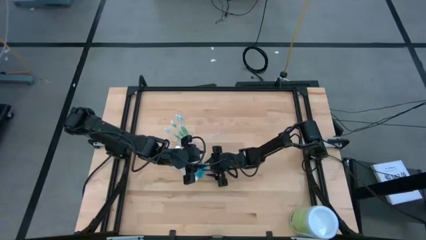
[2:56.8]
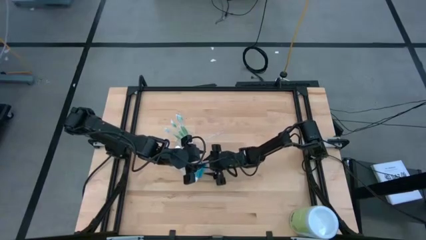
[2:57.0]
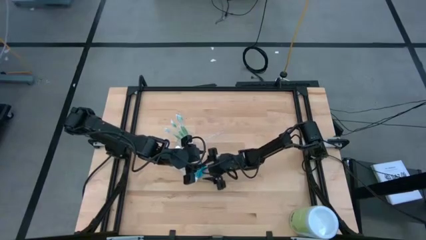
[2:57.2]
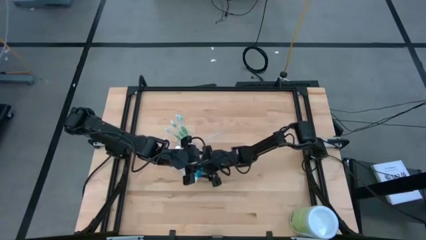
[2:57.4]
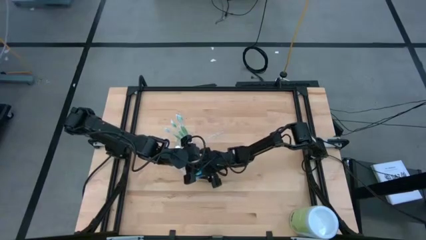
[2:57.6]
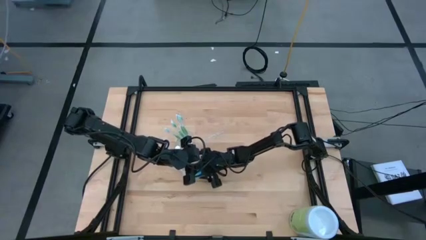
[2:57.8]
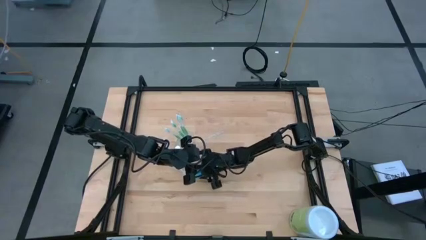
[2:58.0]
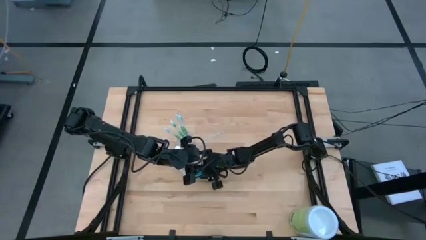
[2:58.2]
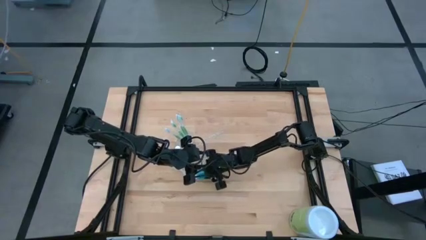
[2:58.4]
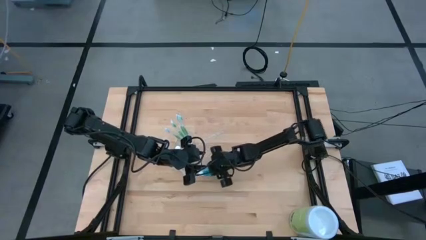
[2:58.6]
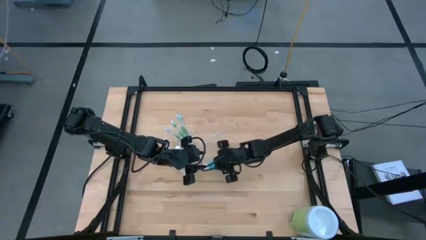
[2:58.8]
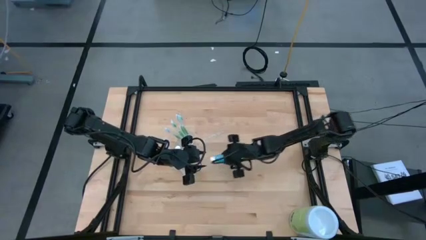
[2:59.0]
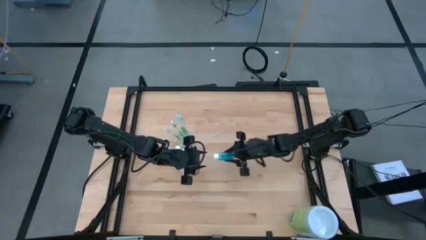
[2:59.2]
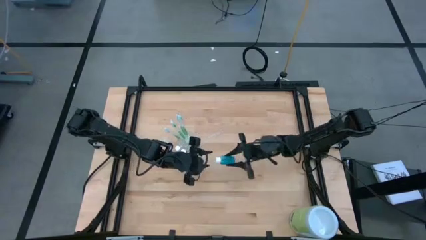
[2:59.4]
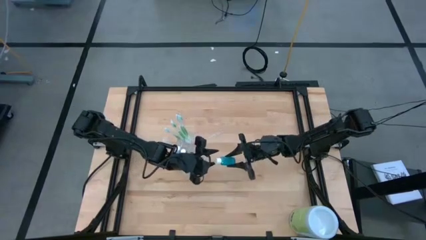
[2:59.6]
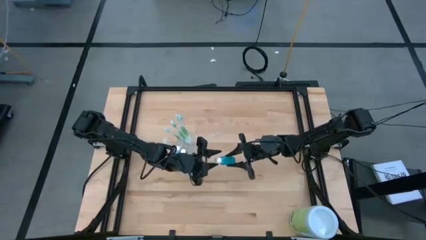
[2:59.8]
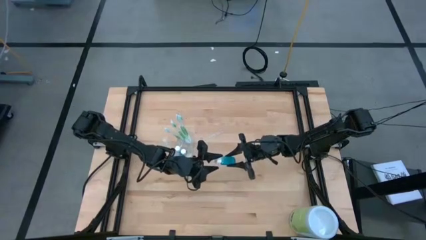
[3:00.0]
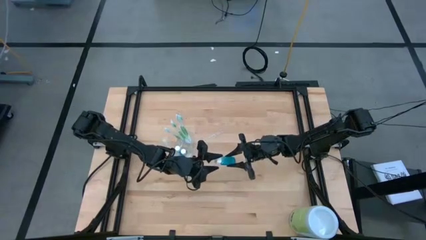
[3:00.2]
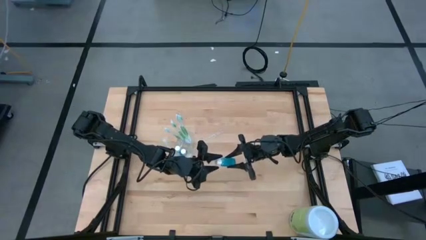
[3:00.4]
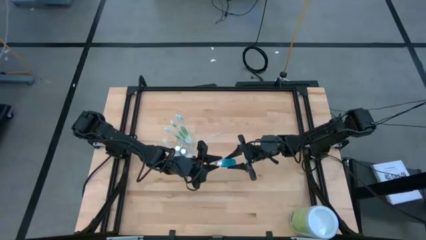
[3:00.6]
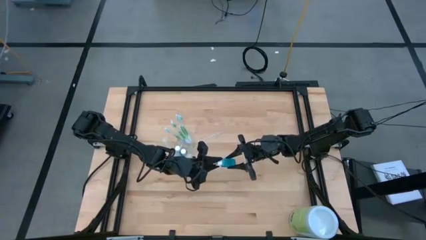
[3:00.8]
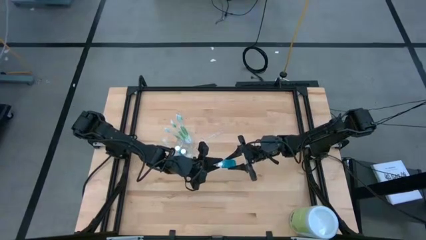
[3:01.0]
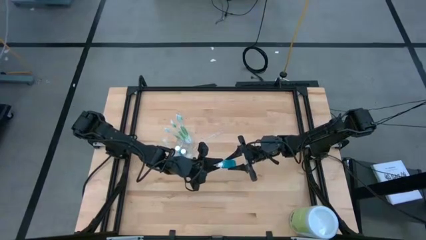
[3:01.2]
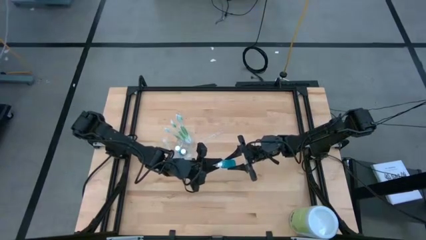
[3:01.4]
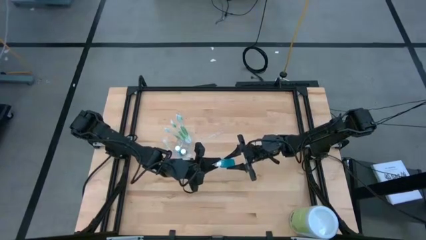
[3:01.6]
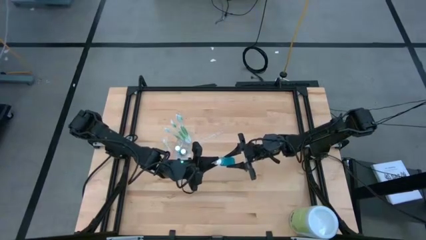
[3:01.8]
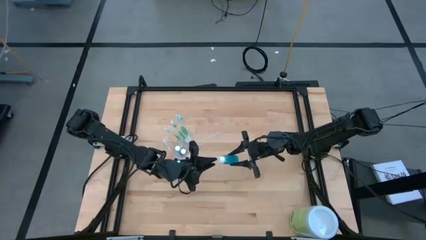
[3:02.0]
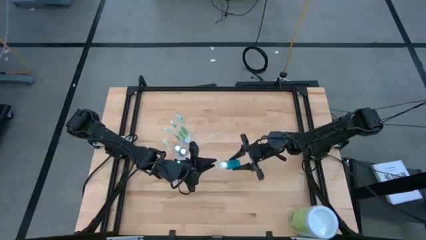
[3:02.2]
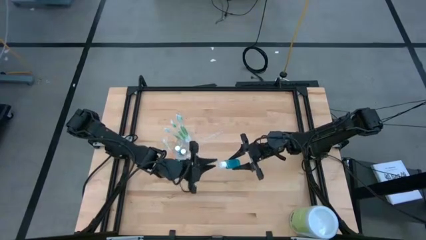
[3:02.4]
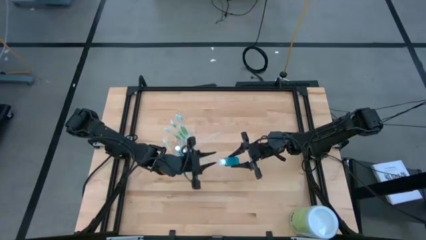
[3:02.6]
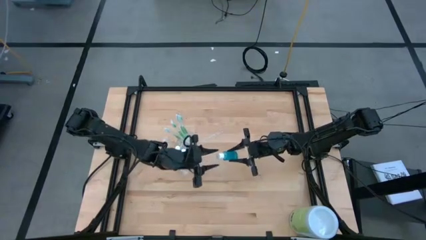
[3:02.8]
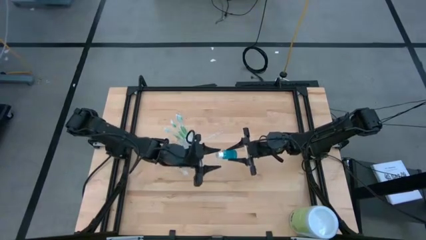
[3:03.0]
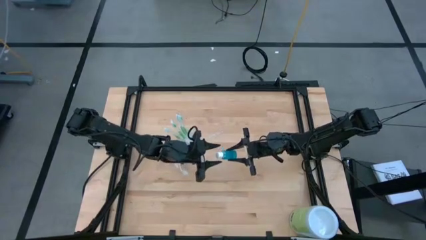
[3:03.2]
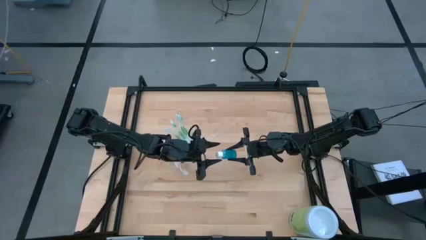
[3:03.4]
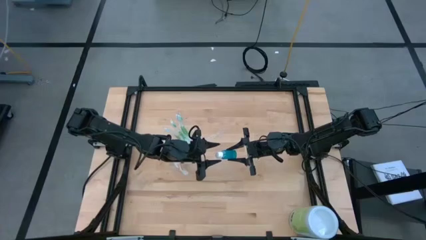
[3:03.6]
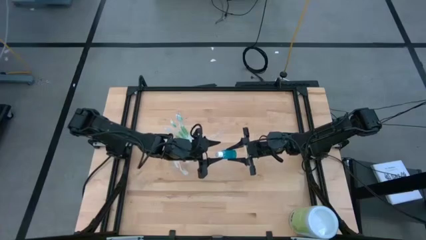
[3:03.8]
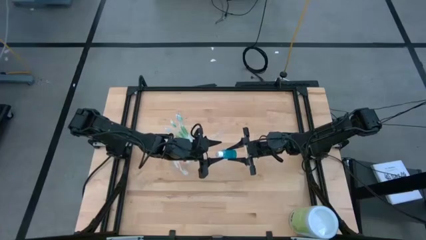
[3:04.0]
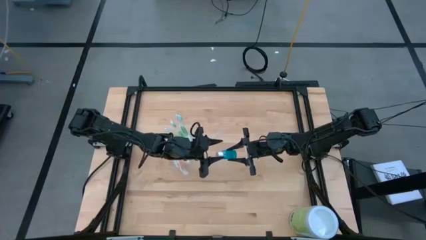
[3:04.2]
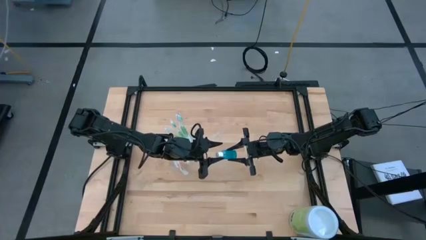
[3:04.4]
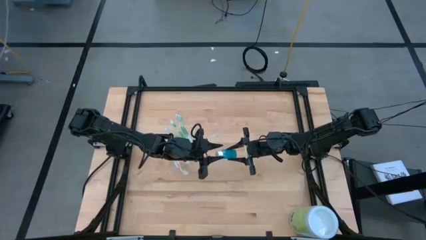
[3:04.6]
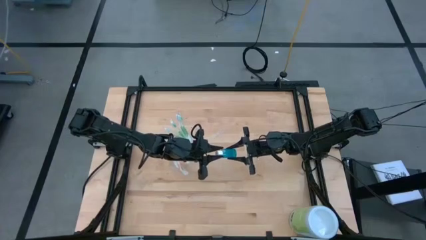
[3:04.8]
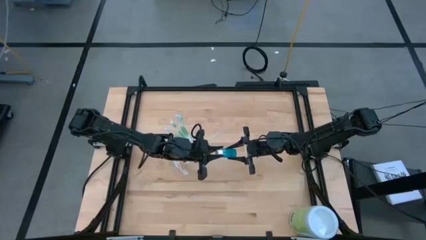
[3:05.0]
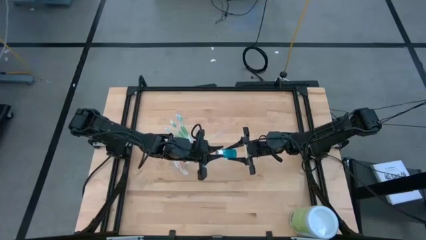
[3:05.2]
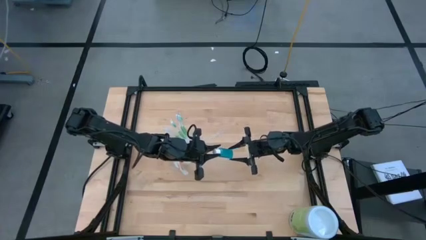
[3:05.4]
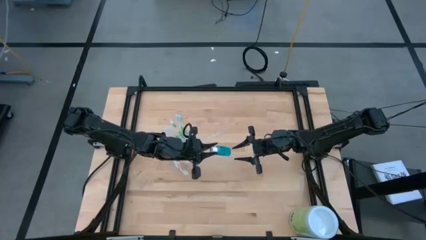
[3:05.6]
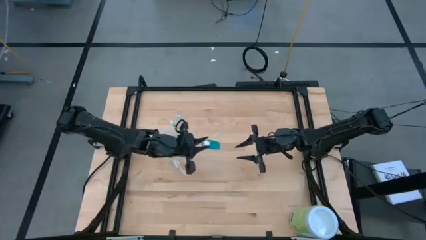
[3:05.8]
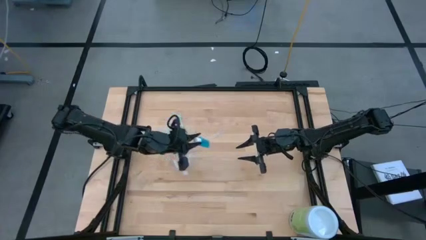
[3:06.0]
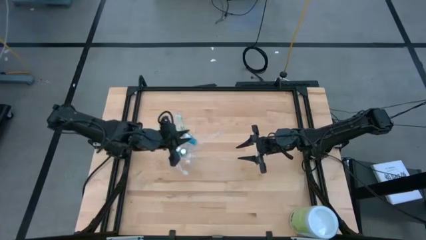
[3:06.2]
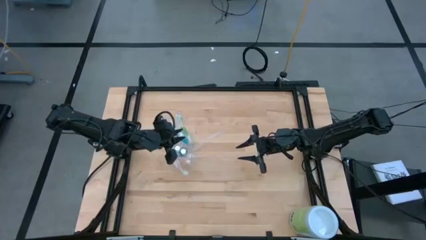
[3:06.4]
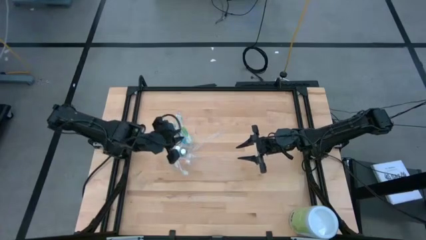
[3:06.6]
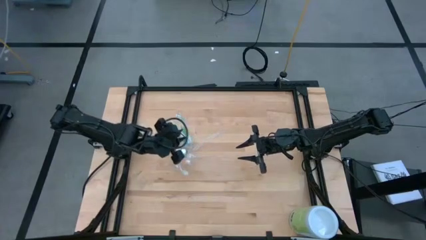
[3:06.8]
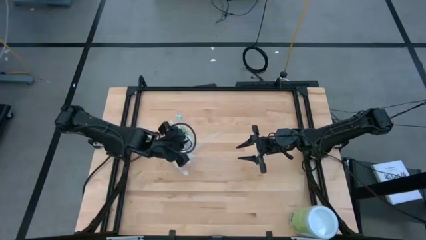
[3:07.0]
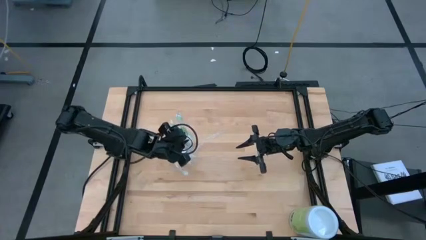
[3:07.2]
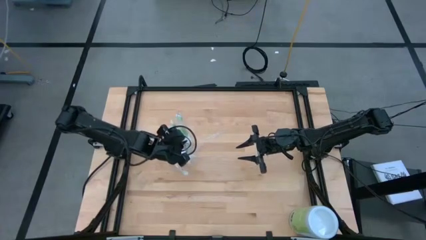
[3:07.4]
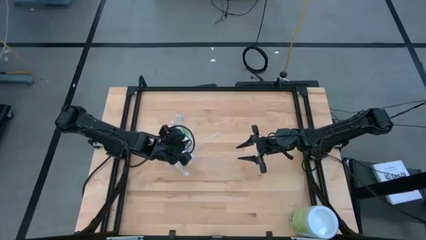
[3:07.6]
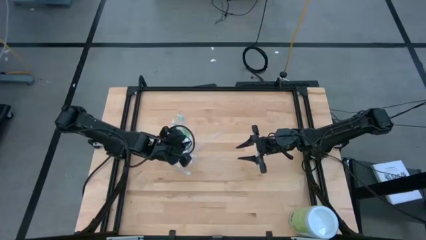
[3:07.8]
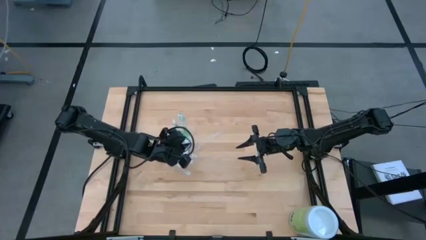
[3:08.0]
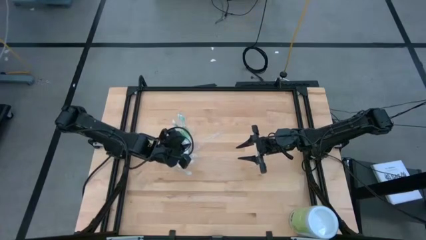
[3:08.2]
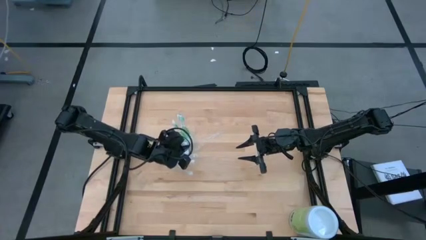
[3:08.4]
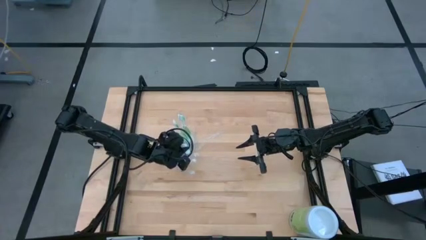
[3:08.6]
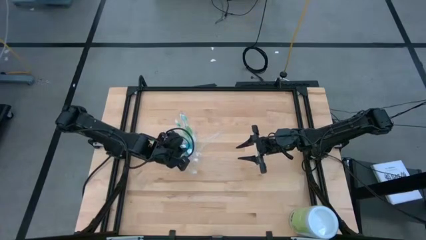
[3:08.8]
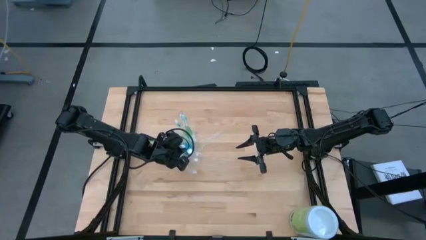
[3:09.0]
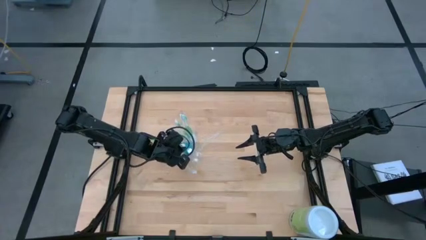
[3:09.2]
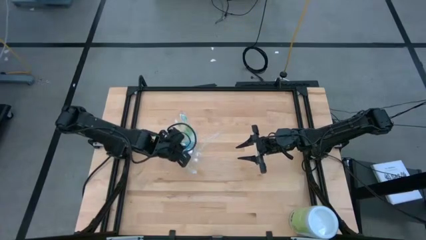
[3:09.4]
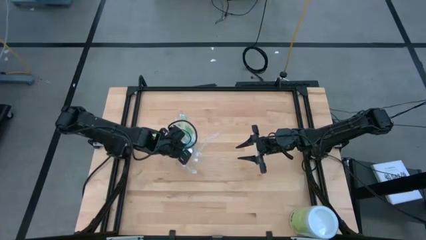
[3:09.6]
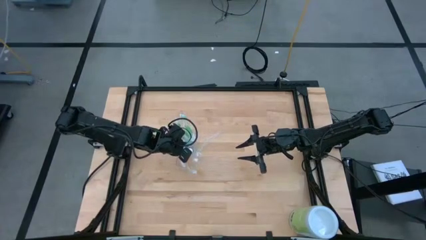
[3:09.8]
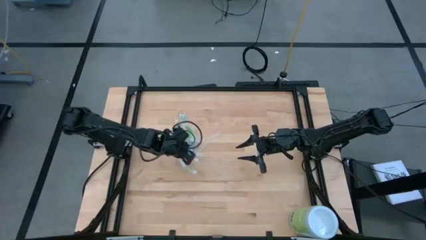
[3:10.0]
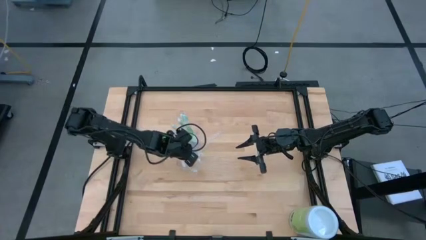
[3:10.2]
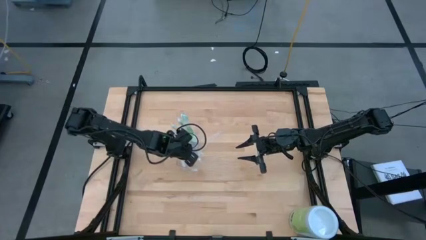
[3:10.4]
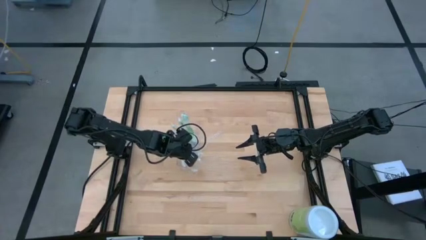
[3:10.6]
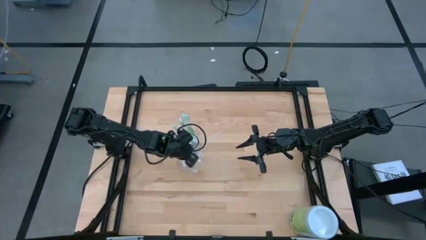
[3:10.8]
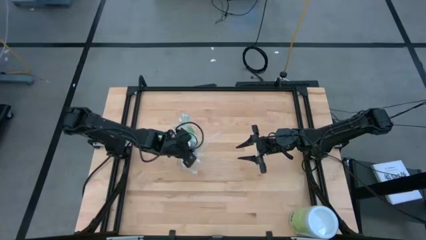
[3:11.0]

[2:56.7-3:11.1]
Task: Pick & Place toothbrushing station
Put the blue mouthwash into the middle section of the transparent organizer

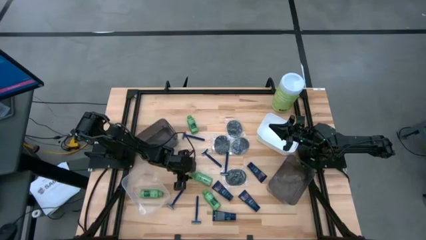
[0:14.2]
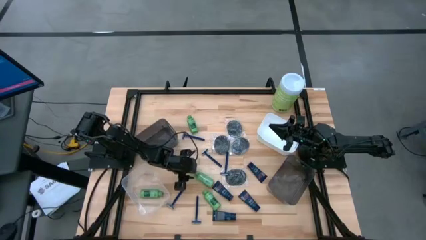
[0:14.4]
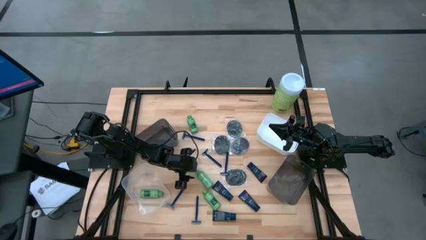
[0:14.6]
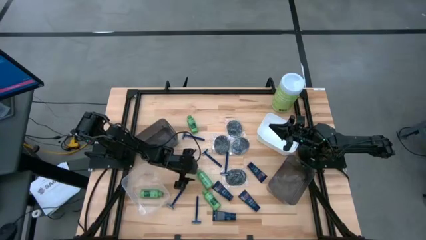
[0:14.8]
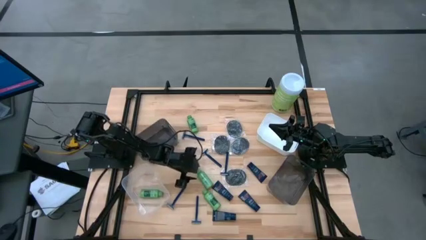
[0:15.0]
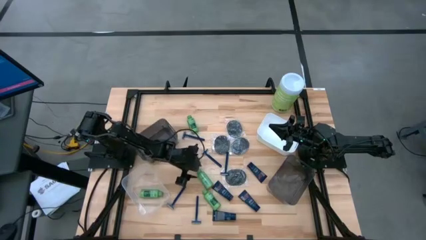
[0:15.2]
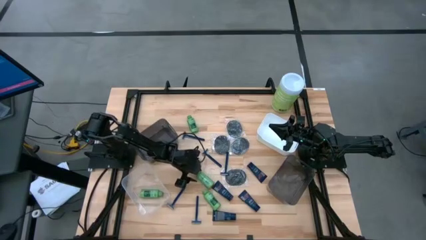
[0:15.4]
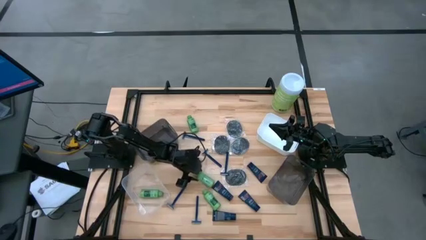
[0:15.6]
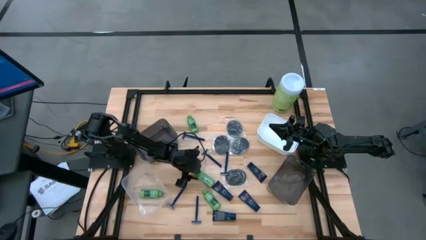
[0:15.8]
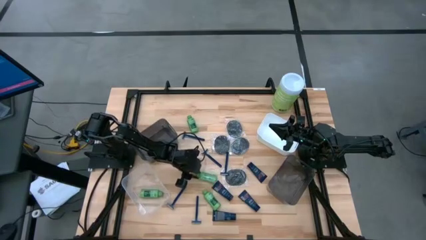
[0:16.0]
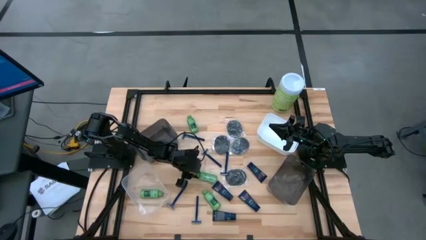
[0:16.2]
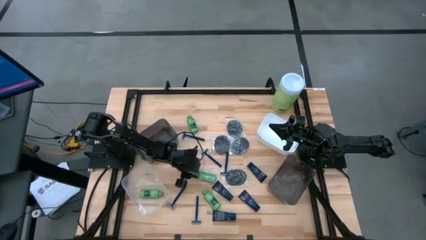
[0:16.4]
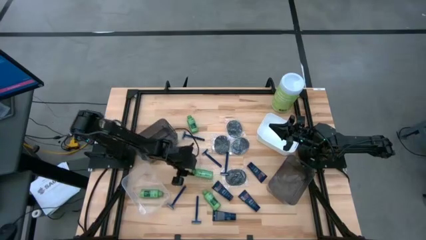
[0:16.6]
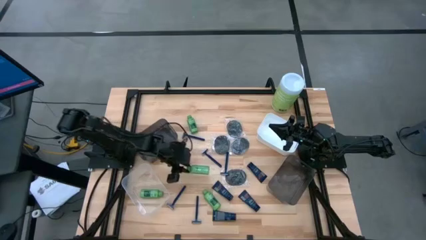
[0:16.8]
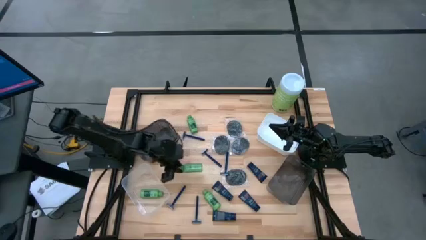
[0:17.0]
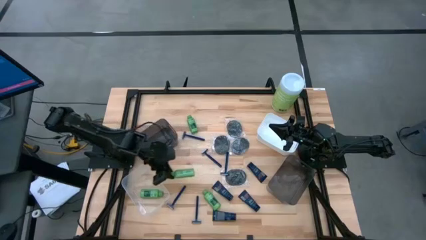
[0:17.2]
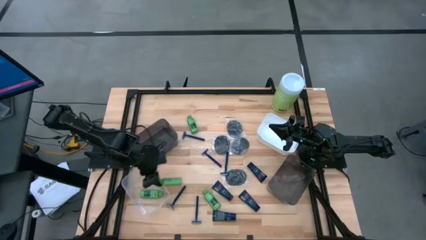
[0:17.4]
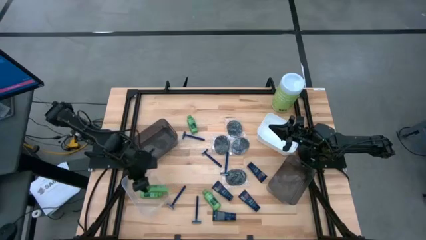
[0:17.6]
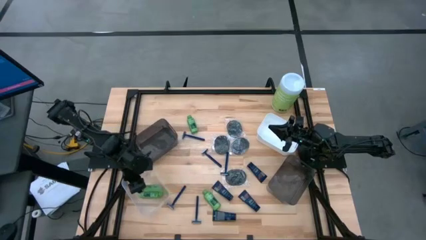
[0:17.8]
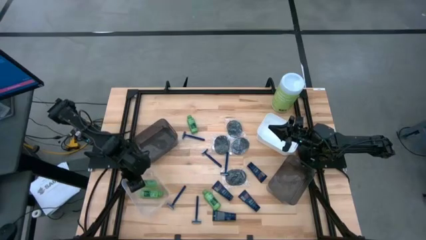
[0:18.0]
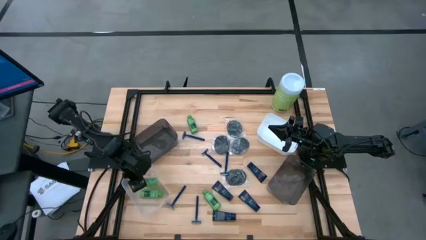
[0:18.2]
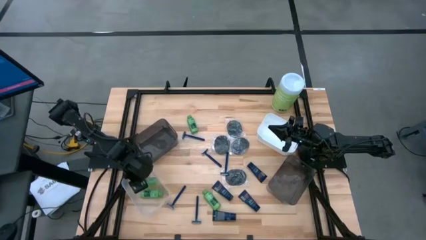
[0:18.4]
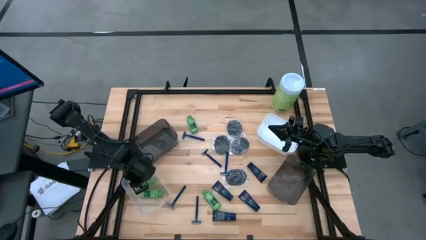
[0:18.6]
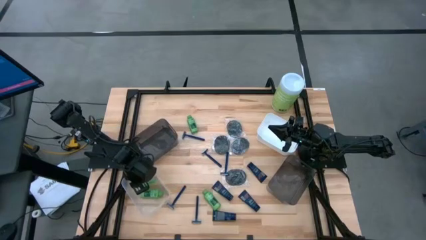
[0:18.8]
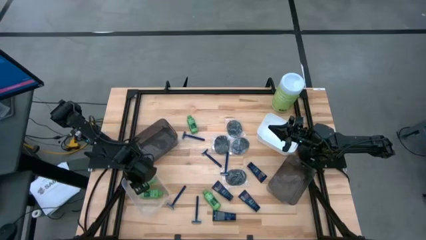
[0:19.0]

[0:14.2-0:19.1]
Task: Pick & Place Travel size toiletries
Put the green shampoo into the transparent bin
